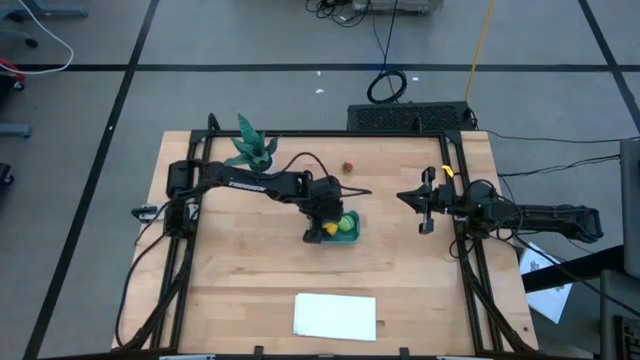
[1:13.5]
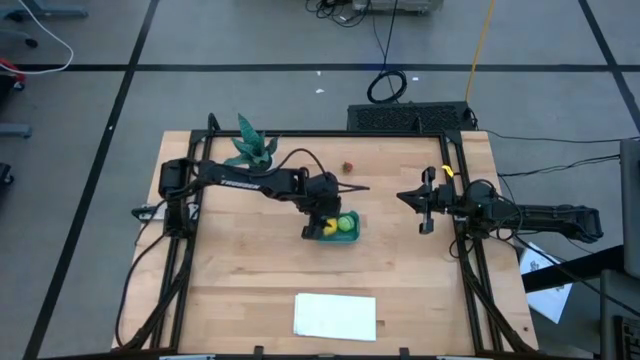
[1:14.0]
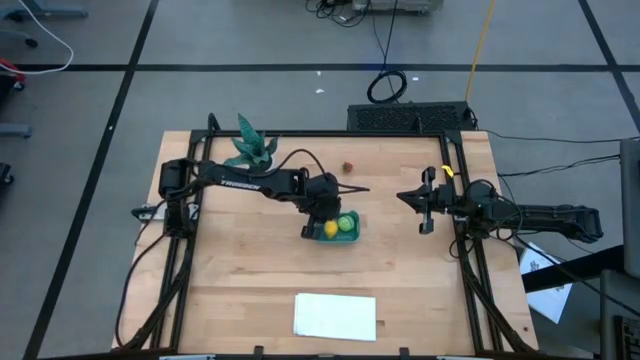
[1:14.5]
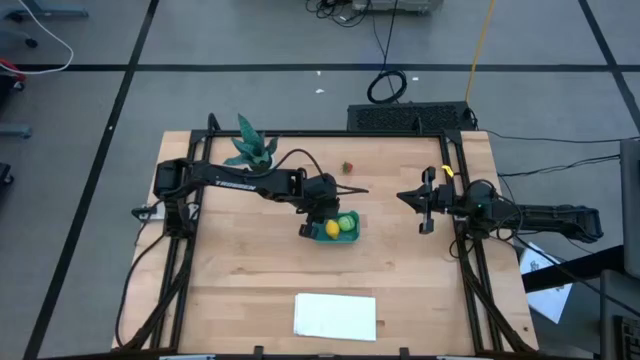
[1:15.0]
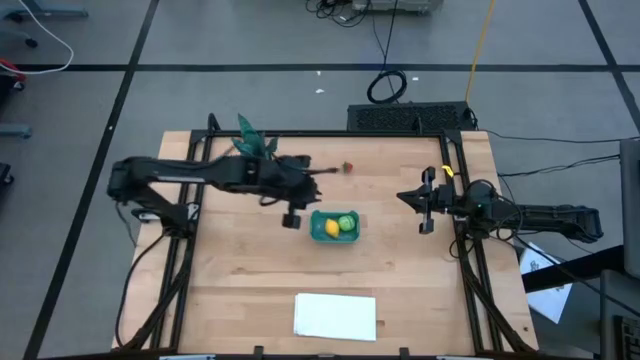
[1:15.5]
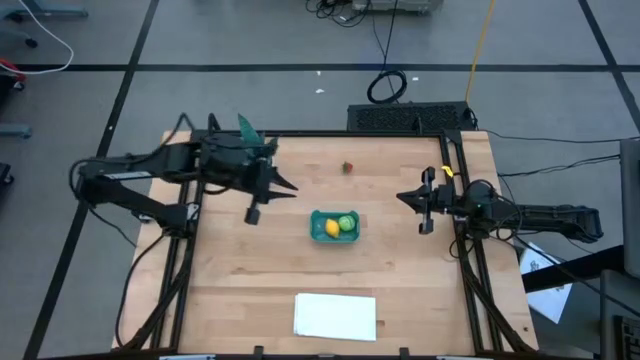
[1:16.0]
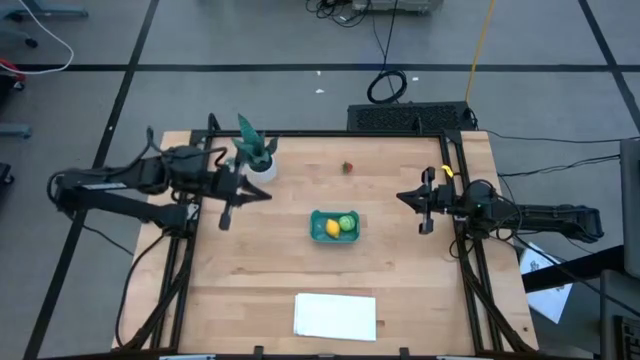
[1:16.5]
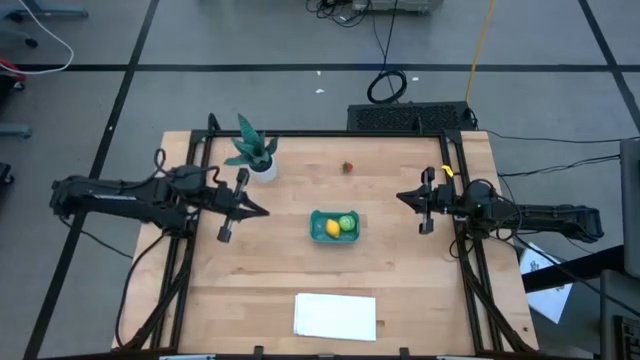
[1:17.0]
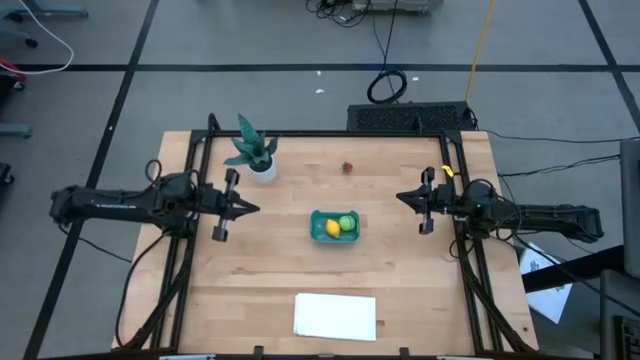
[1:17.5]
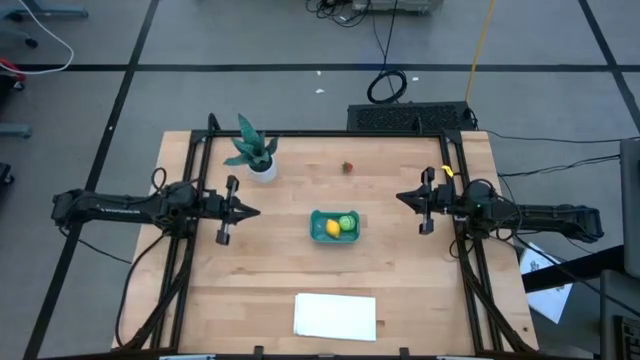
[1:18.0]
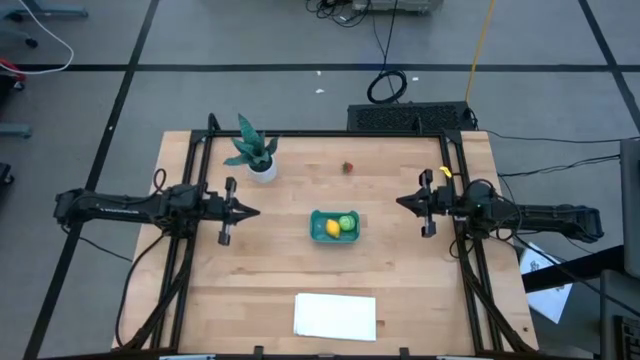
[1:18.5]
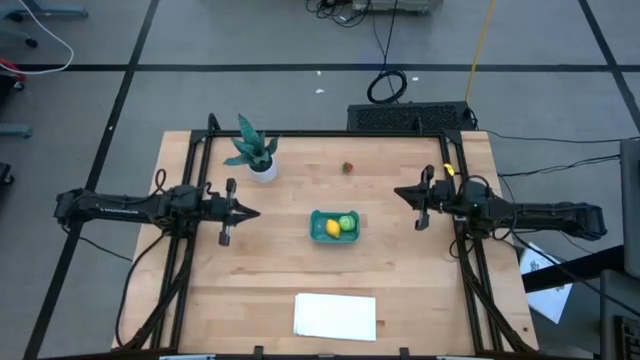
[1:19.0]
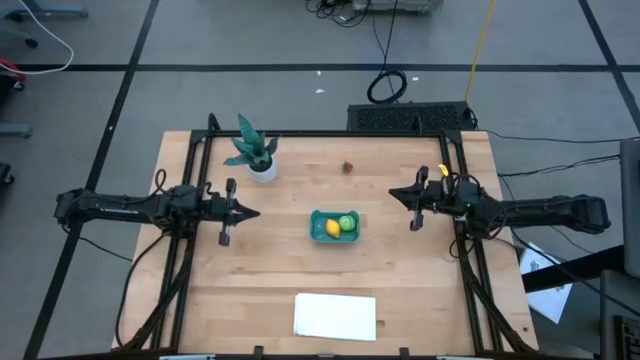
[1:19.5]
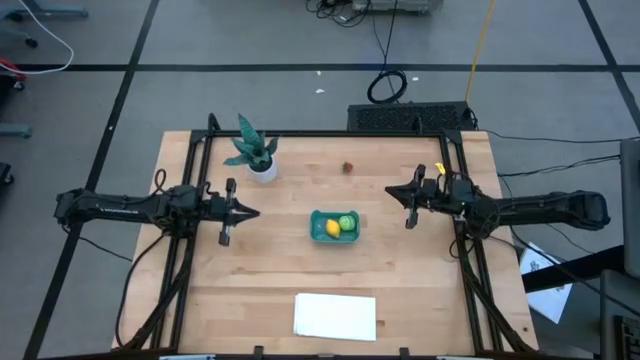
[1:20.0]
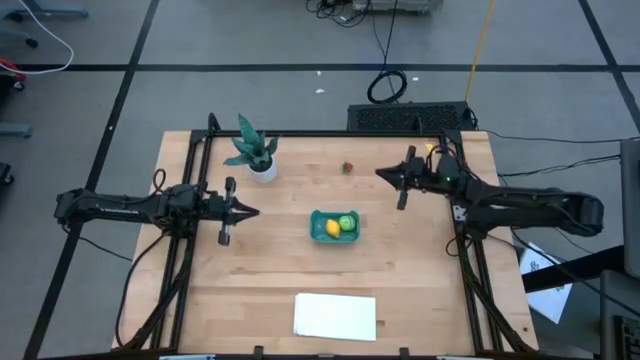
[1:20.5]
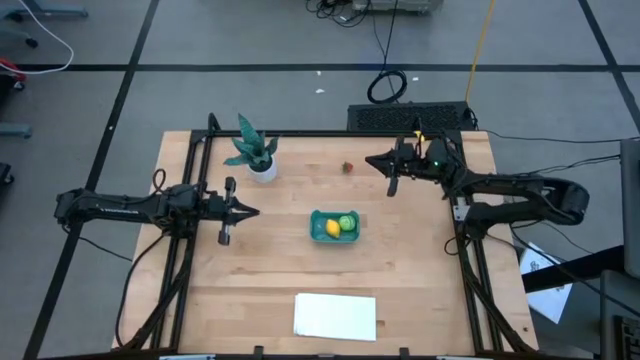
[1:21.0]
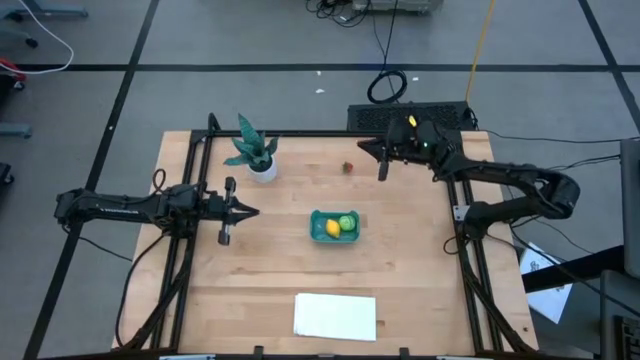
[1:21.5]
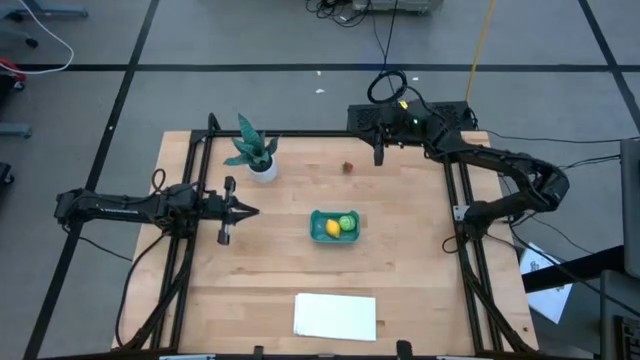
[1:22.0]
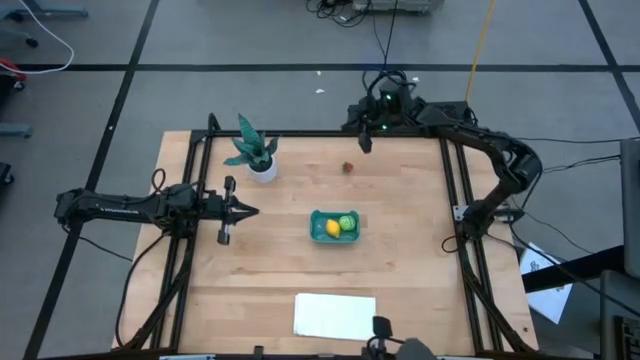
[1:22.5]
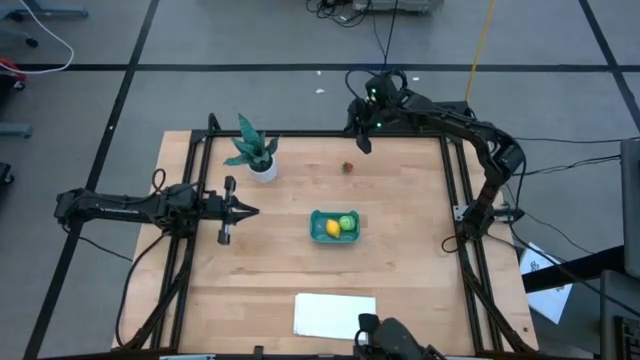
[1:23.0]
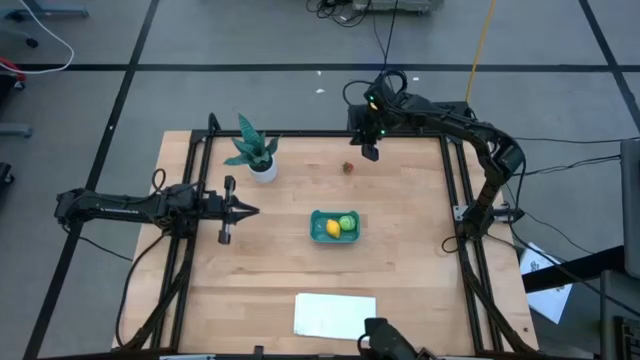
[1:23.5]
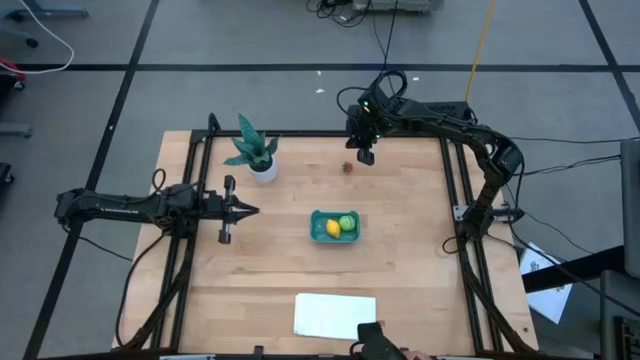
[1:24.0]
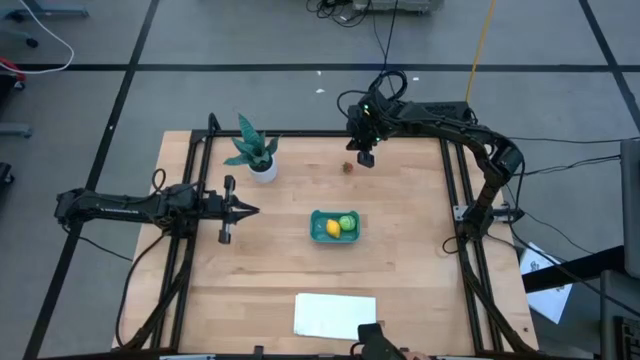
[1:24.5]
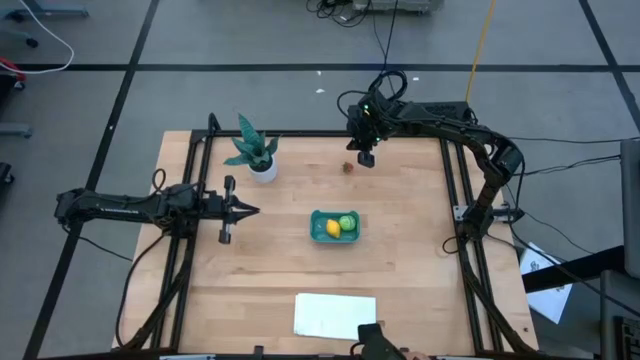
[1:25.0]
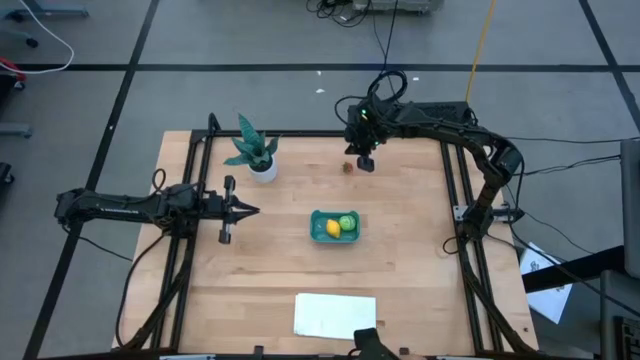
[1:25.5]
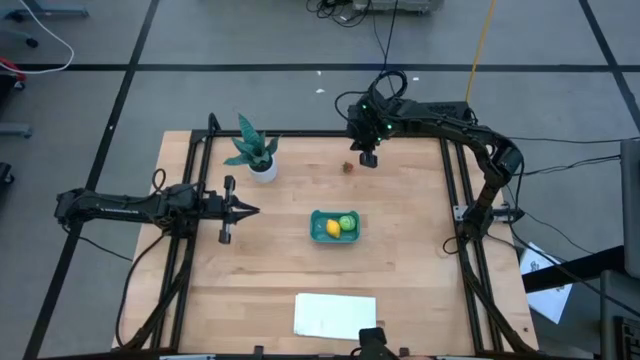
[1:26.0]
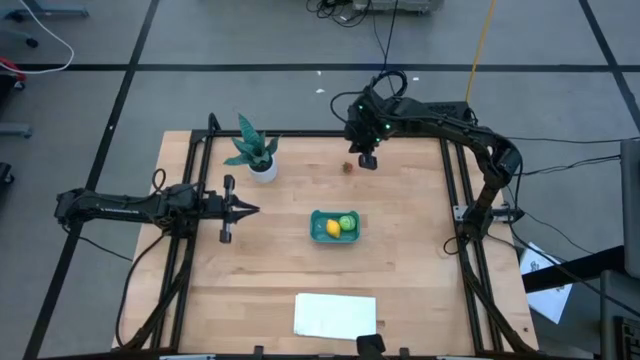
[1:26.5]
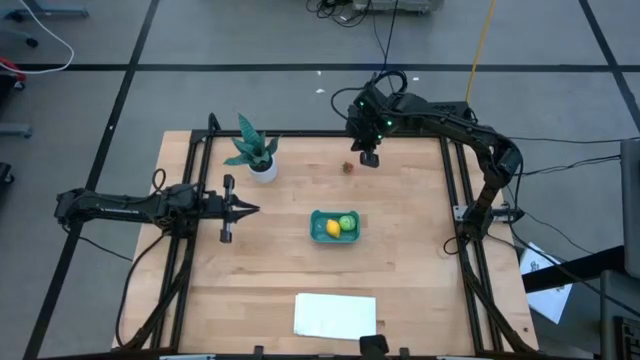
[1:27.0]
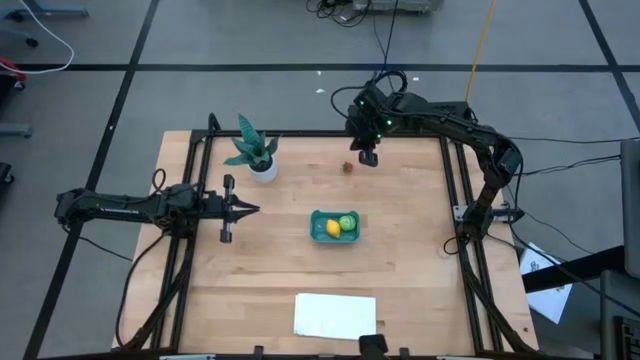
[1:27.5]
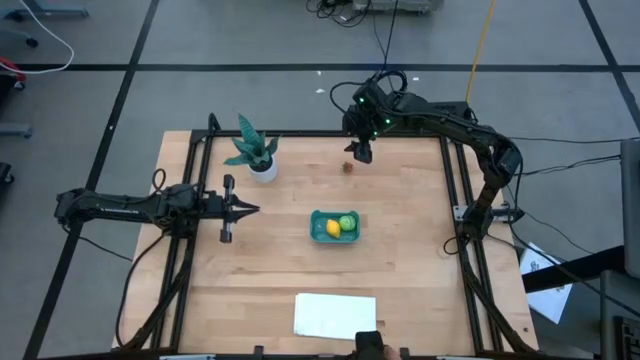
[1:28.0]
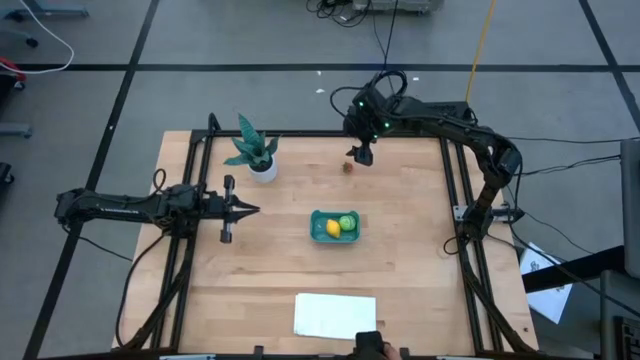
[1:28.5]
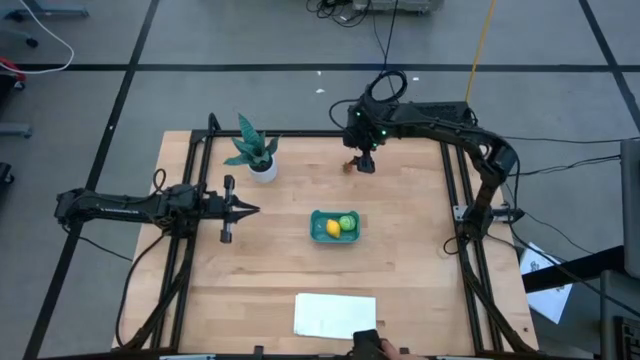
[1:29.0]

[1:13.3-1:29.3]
Task: Pick and placing Produce into tupperware
Put the red strawberry into the blue bin
